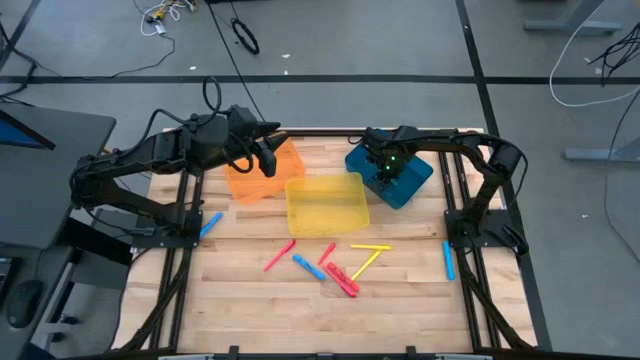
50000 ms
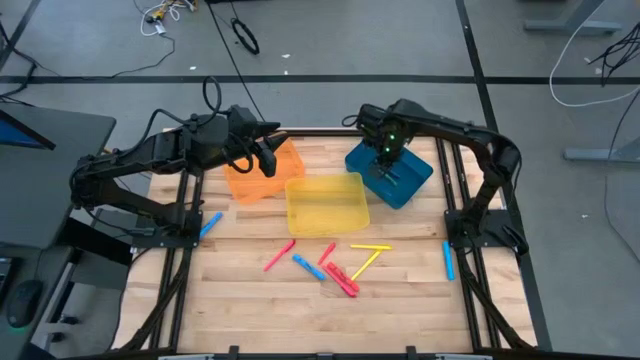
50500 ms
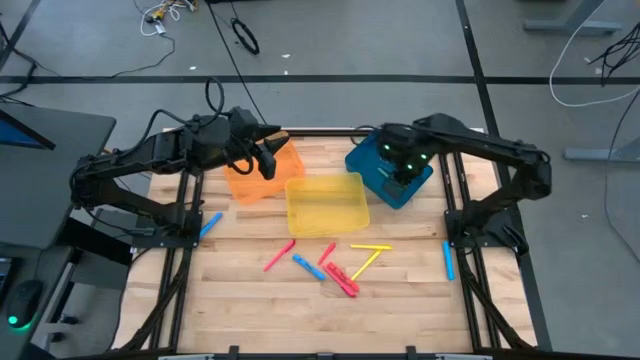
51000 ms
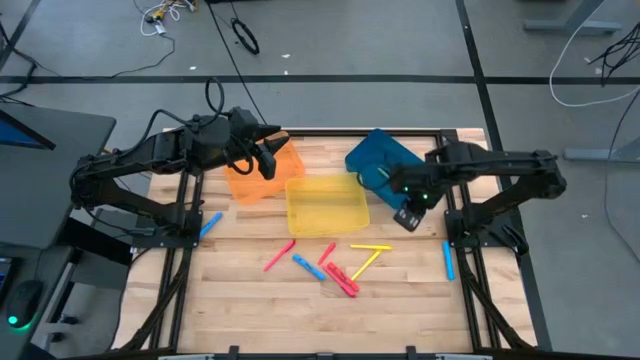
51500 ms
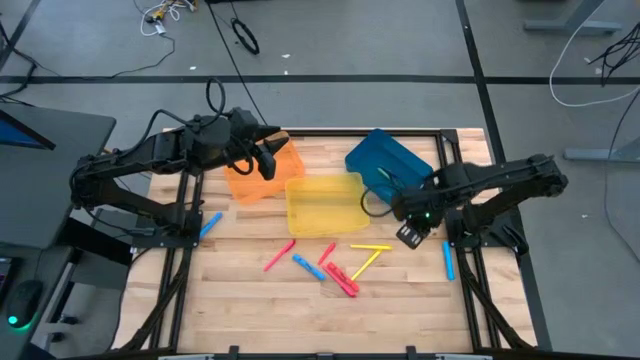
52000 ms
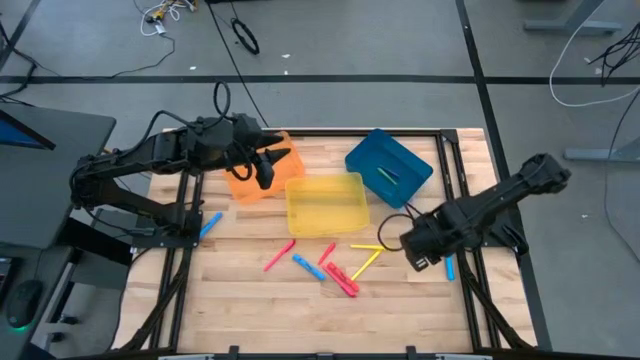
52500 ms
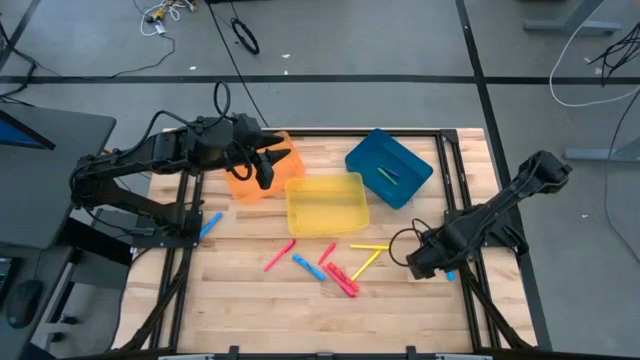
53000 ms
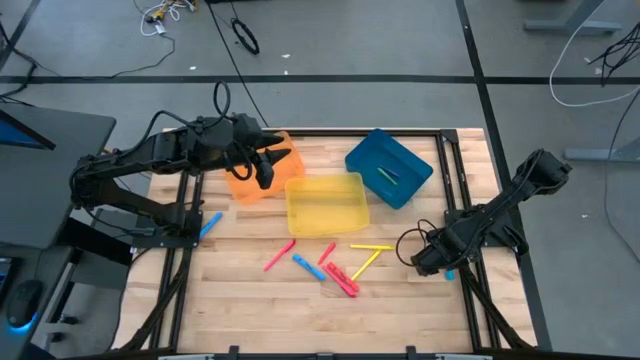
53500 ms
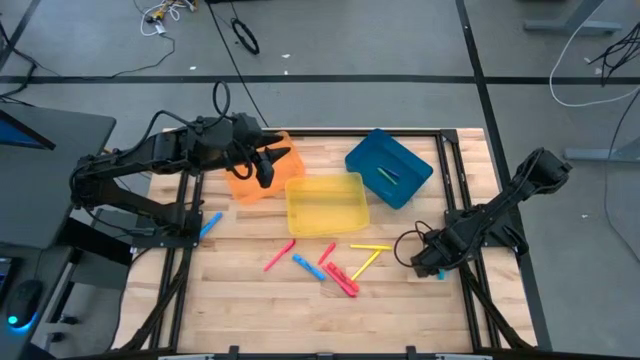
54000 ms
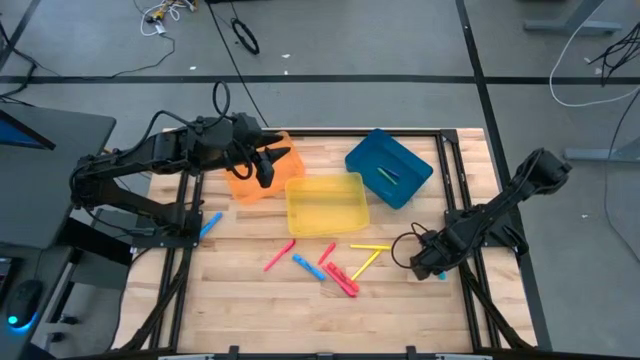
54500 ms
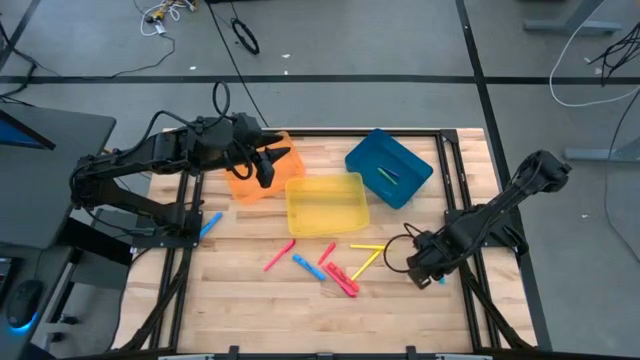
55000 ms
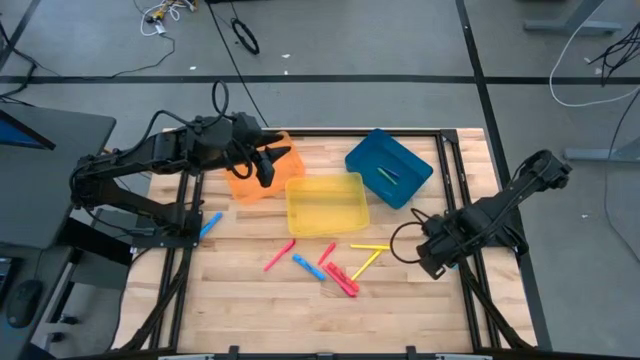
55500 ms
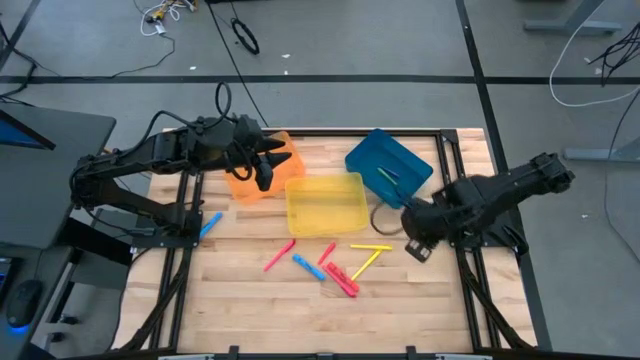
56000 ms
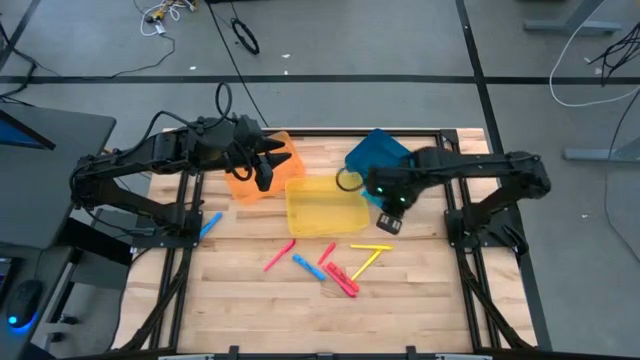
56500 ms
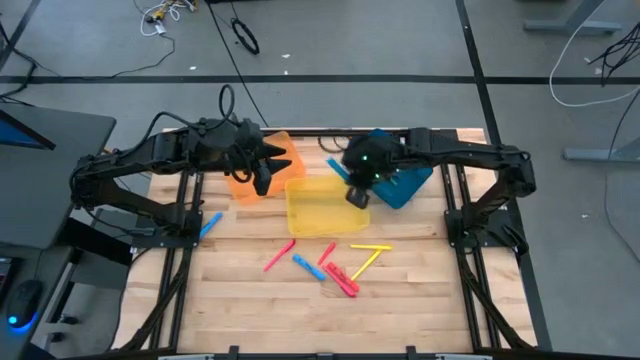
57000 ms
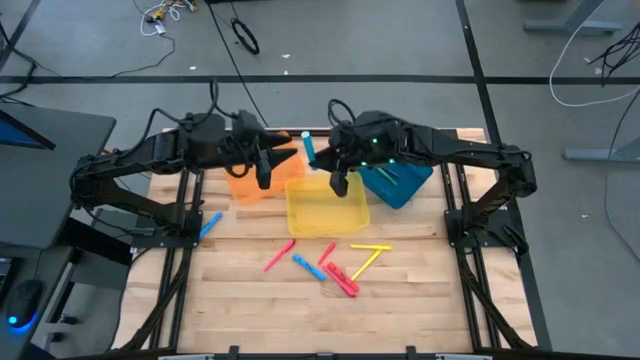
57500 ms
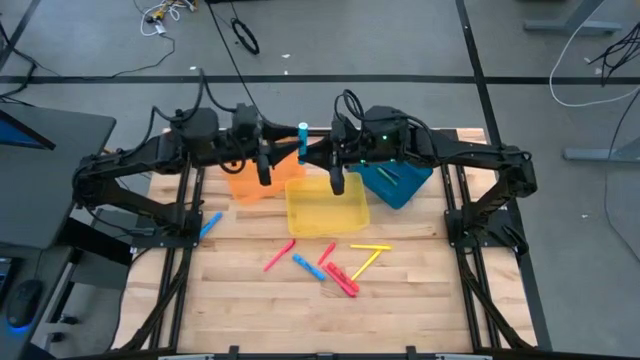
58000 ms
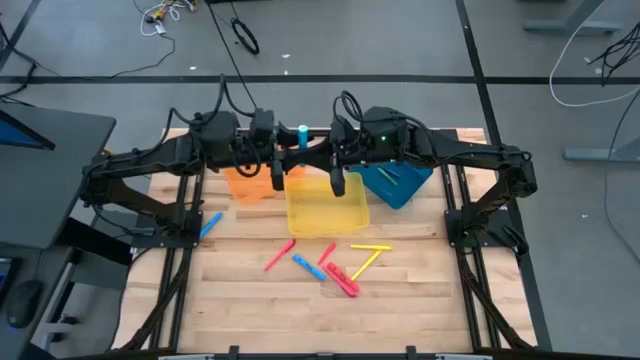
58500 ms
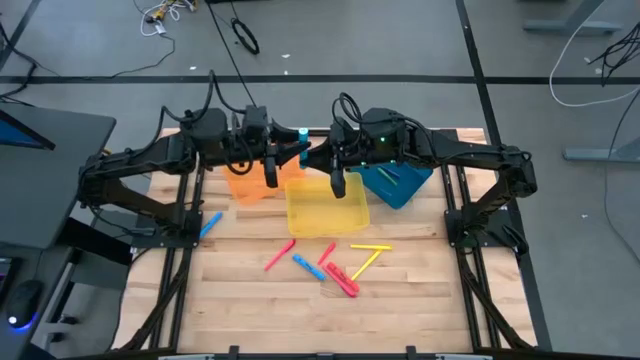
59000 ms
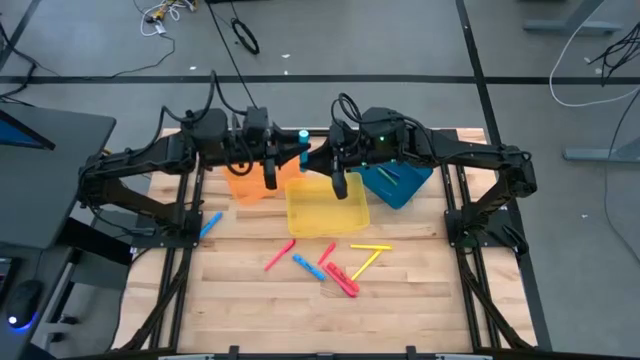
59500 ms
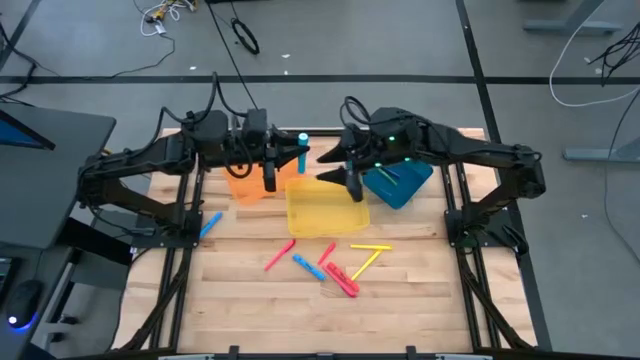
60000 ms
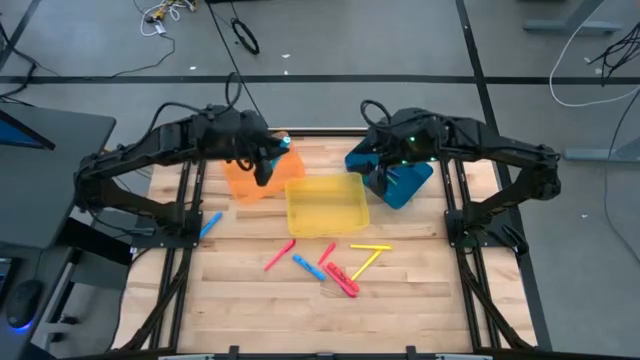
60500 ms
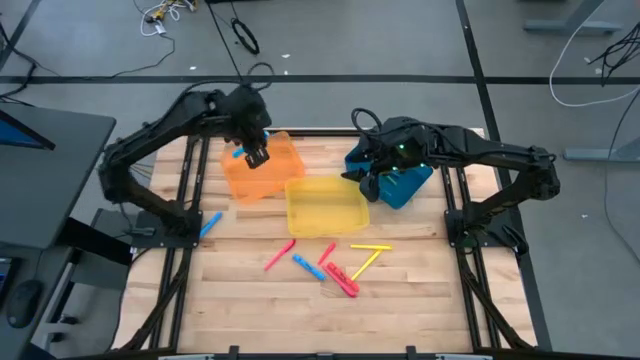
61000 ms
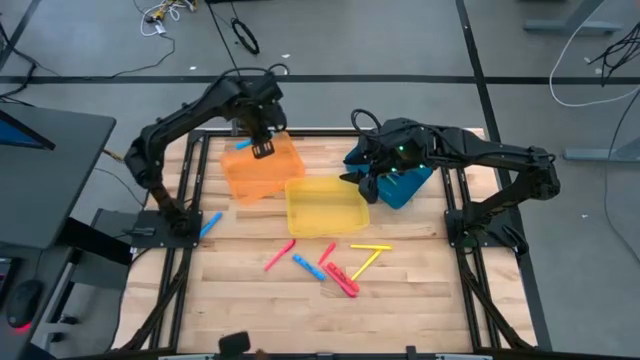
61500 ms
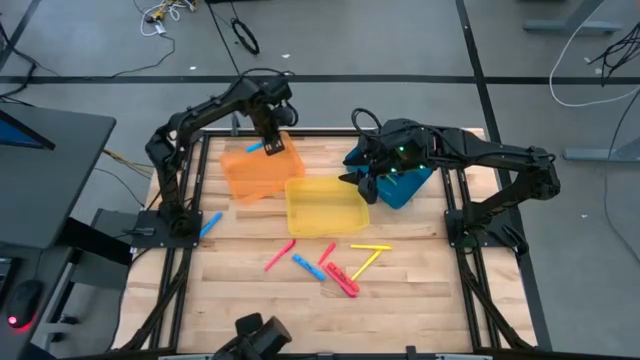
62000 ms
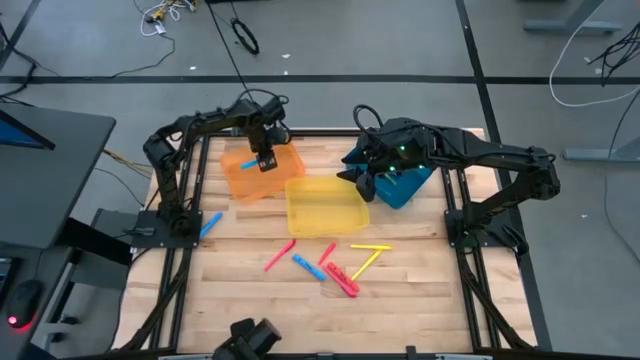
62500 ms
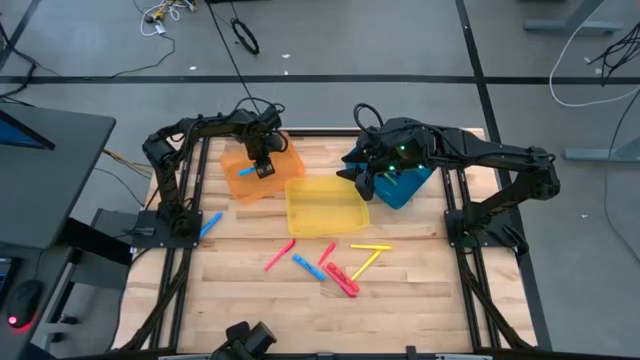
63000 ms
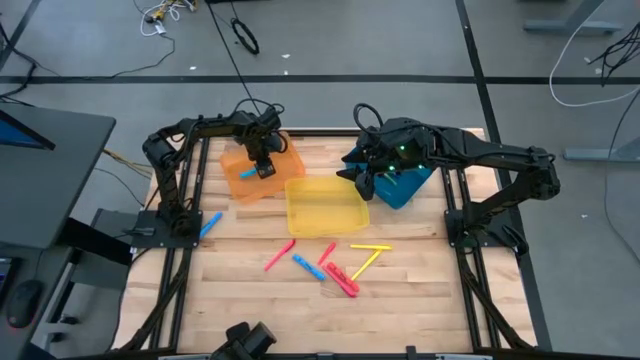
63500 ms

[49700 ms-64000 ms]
Task: Pick & Place Markers
Put the bottom right blue highlighter pen into the orange bin
